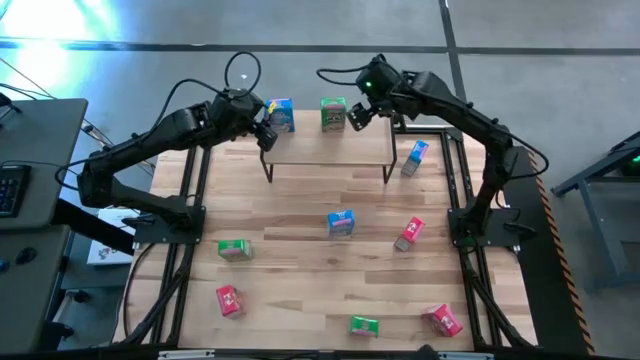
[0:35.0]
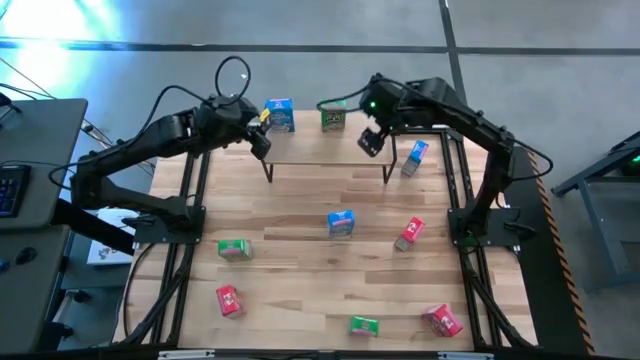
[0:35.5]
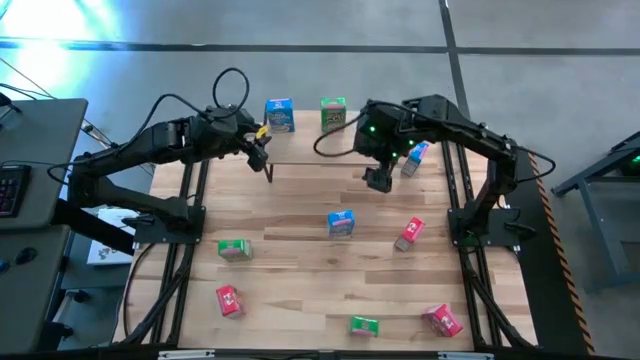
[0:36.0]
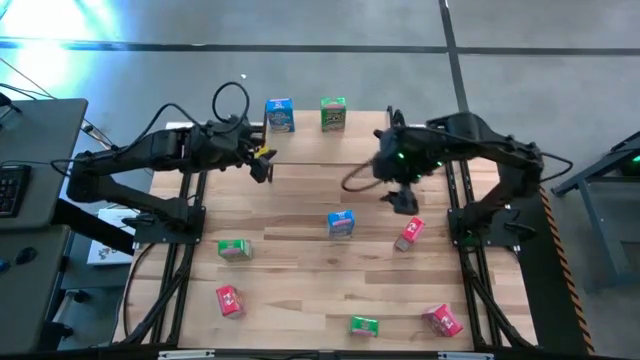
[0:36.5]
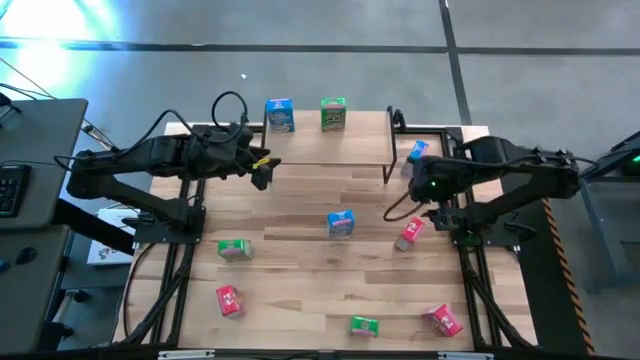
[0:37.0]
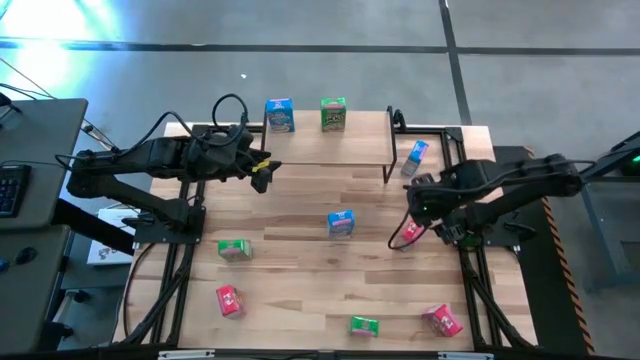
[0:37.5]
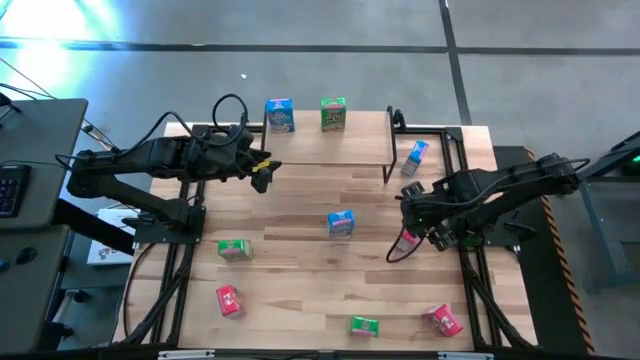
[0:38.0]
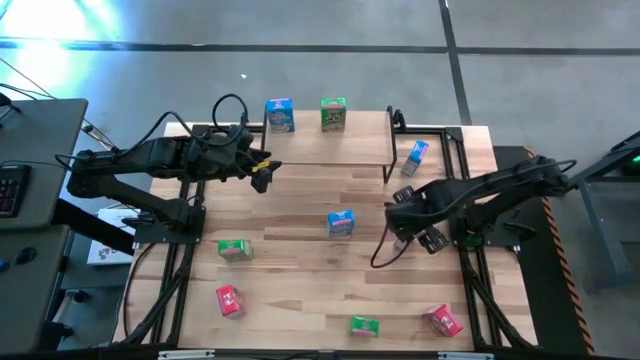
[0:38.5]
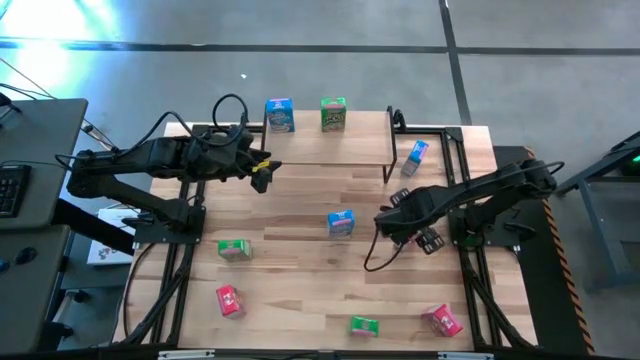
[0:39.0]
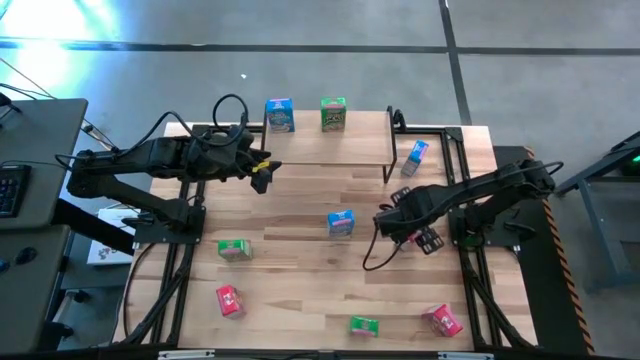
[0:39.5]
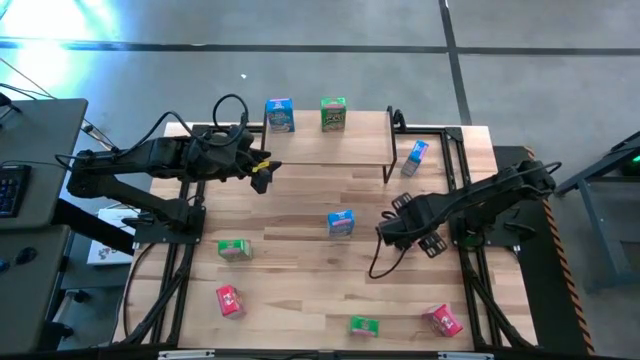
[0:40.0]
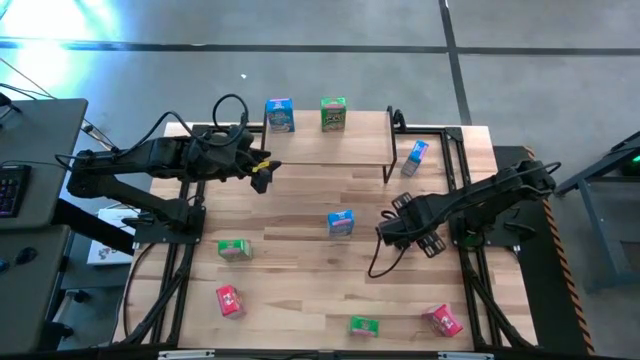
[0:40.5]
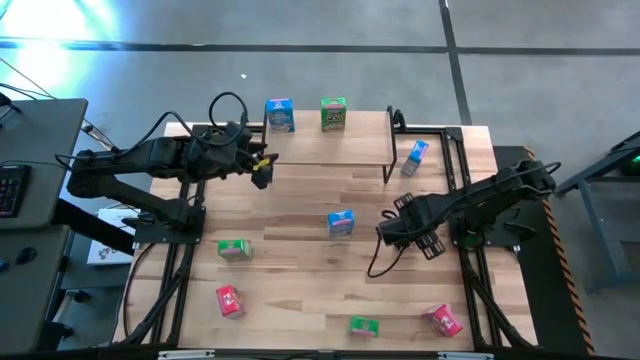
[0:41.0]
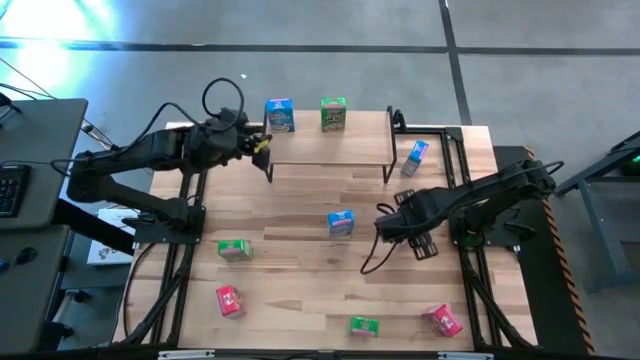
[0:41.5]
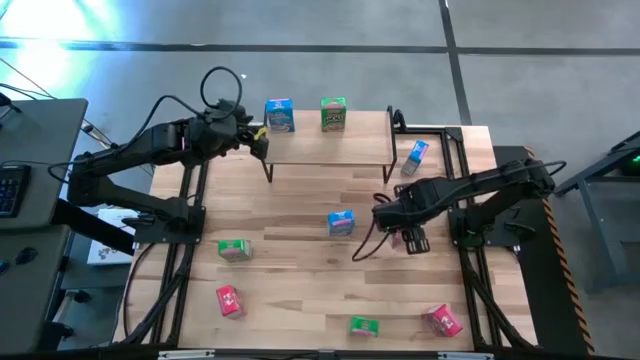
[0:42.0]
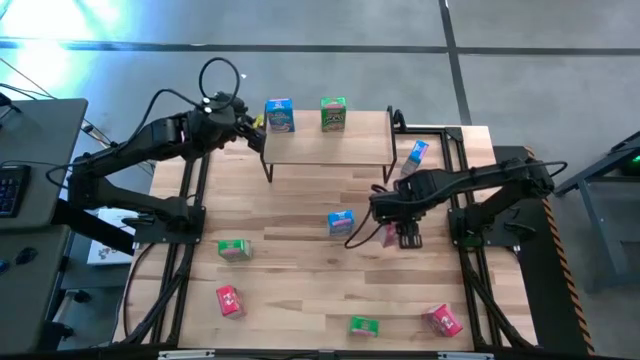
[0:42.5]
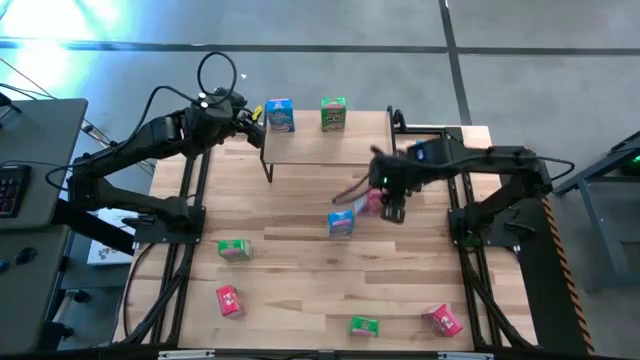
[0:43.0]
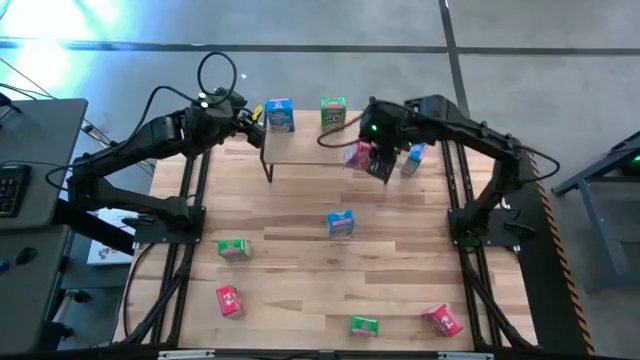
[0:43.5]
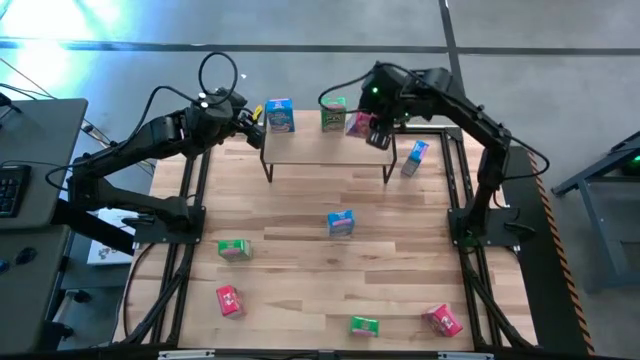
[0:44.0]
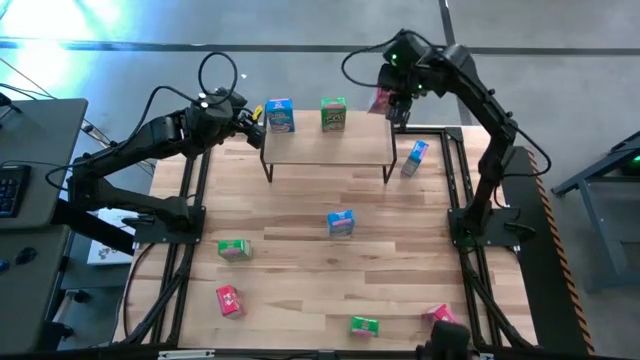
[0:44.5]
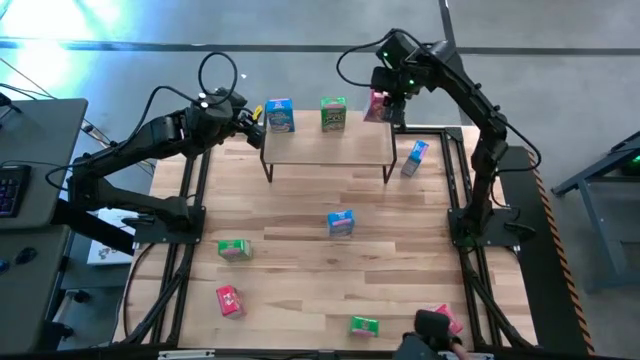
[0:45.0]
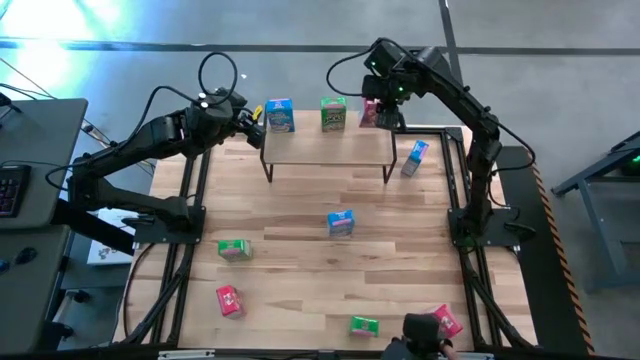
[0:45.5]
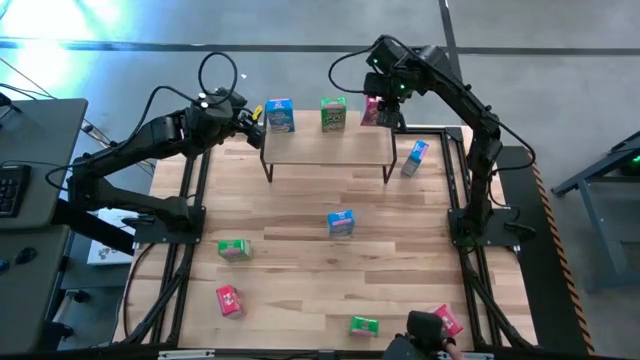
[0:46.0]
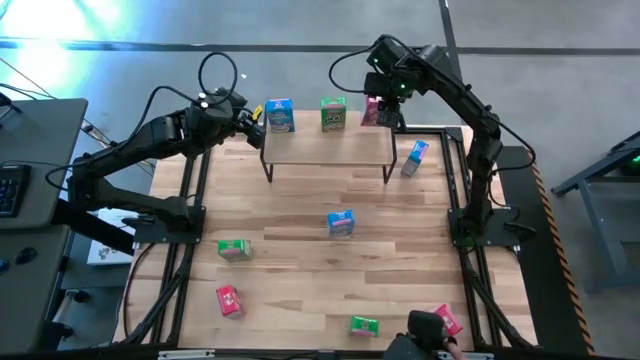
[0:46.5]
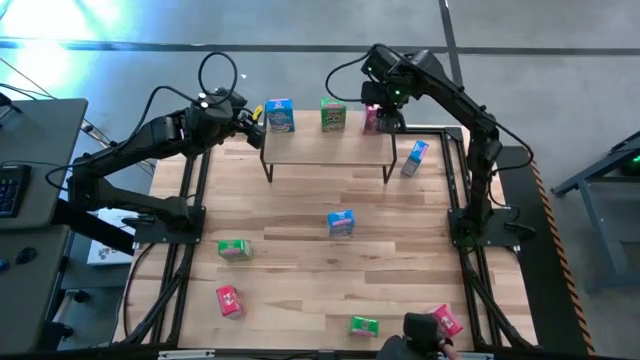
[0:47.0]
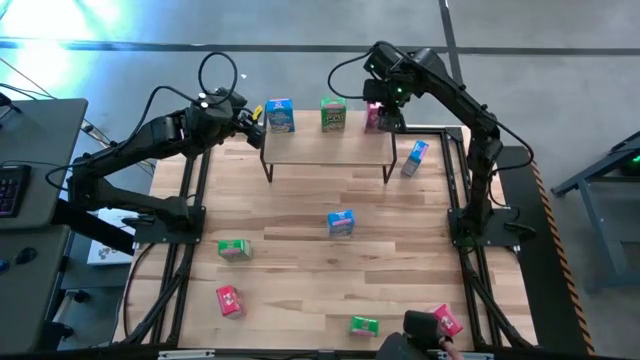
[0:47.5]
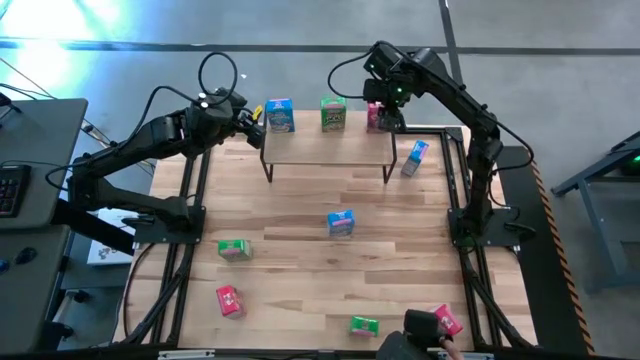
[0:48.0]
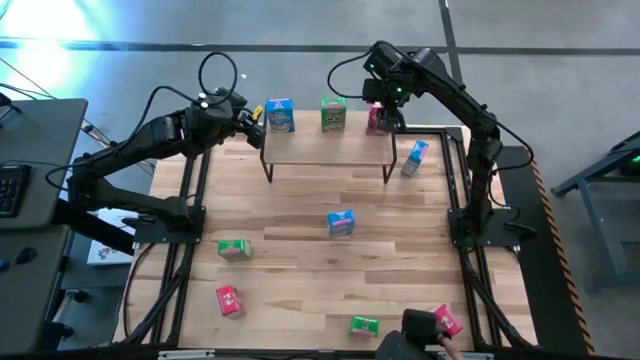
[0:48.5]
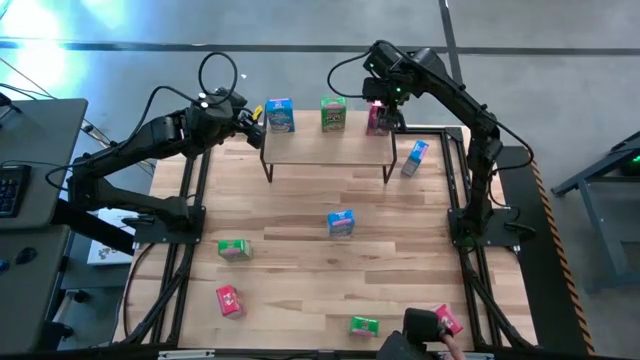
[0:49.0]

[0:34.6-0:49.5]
Task: Stack cereal on shelf
Put the top red cereal box on the shelf

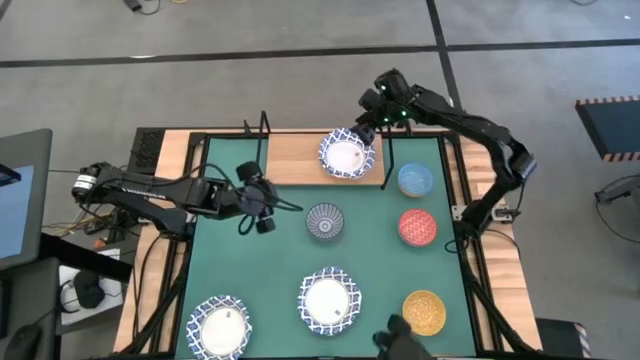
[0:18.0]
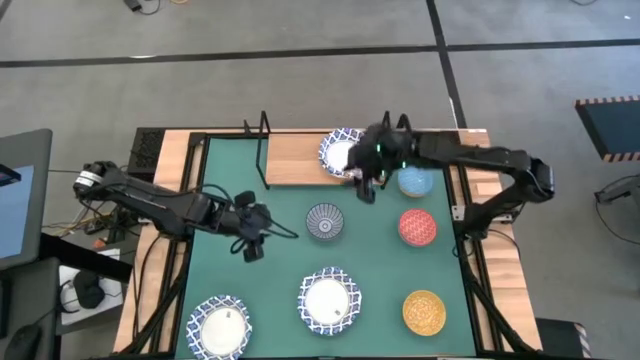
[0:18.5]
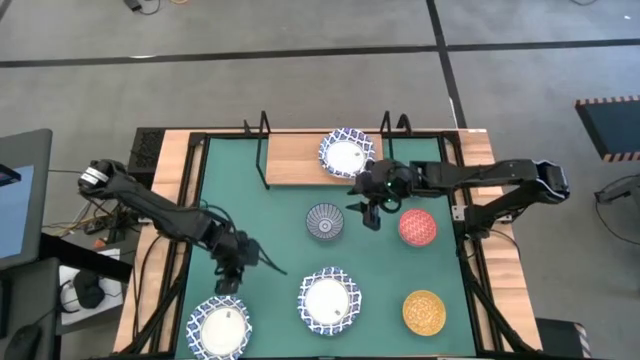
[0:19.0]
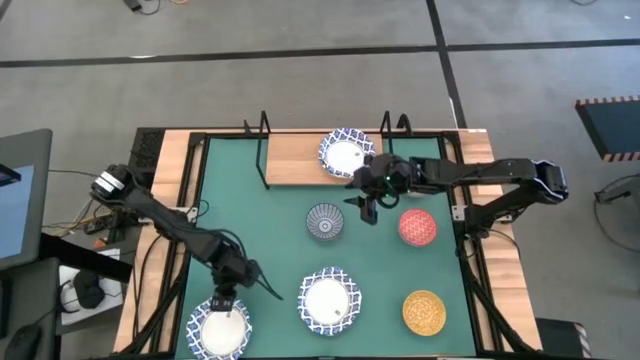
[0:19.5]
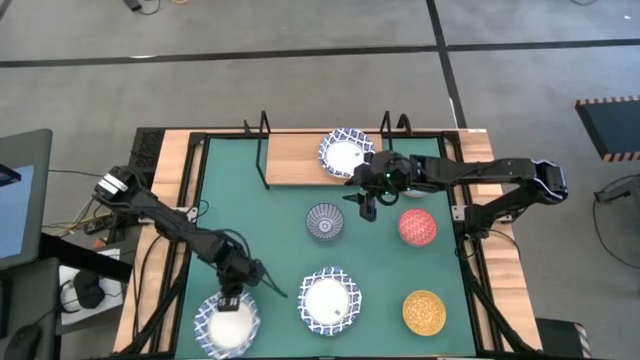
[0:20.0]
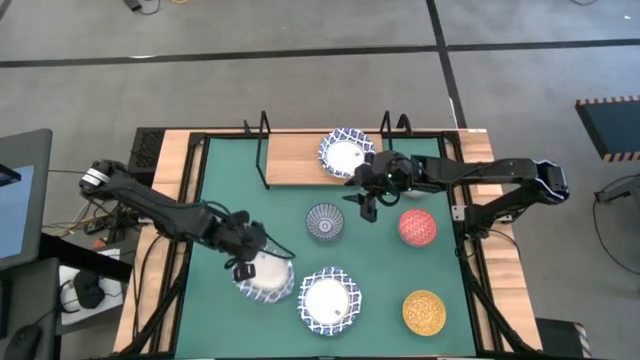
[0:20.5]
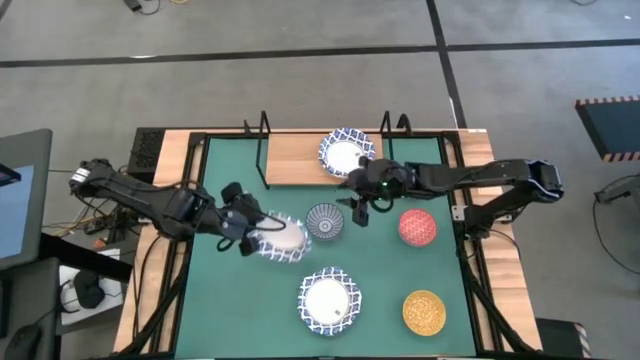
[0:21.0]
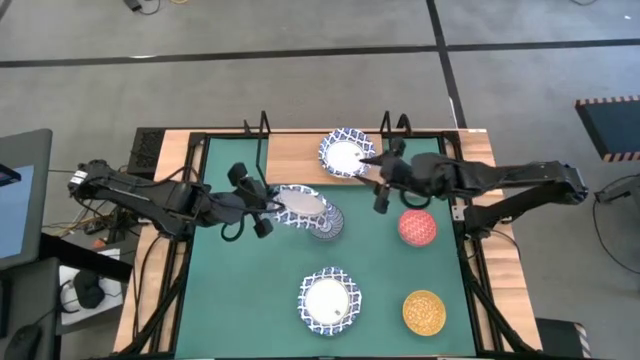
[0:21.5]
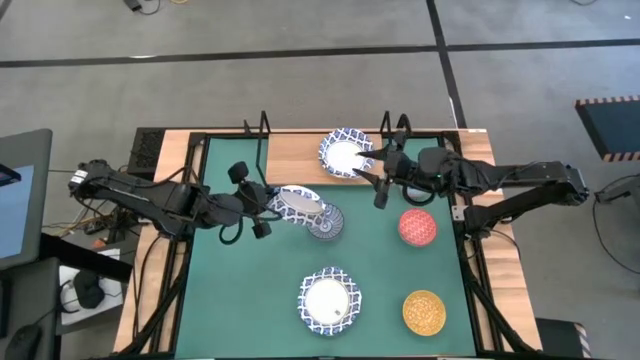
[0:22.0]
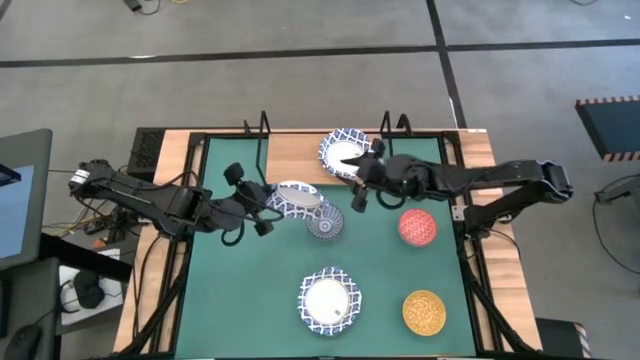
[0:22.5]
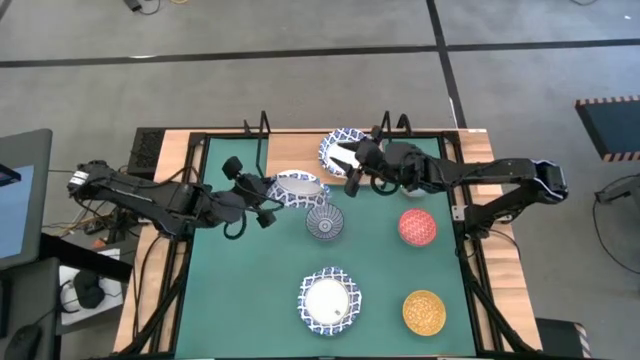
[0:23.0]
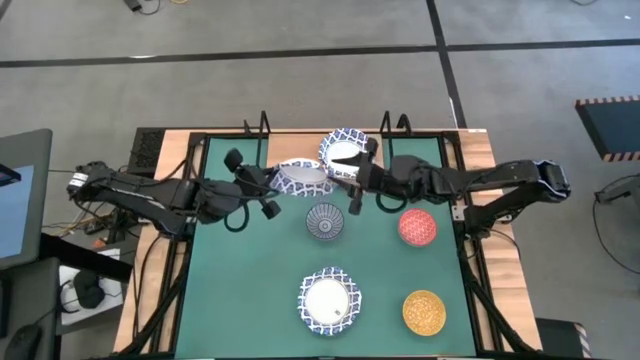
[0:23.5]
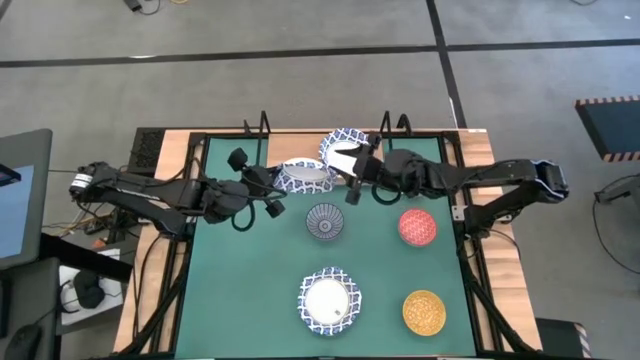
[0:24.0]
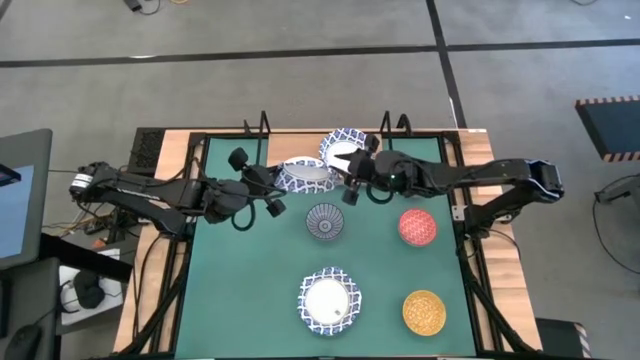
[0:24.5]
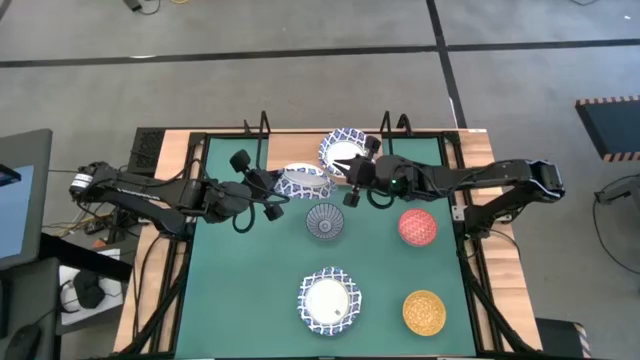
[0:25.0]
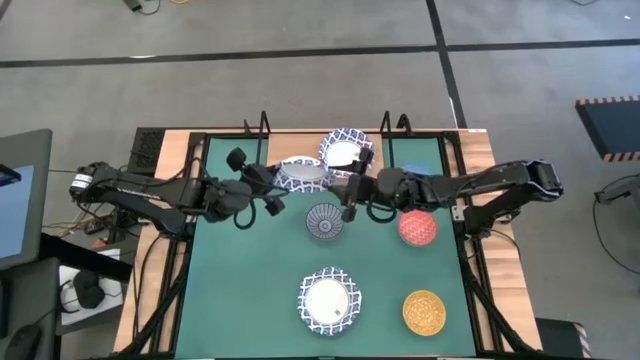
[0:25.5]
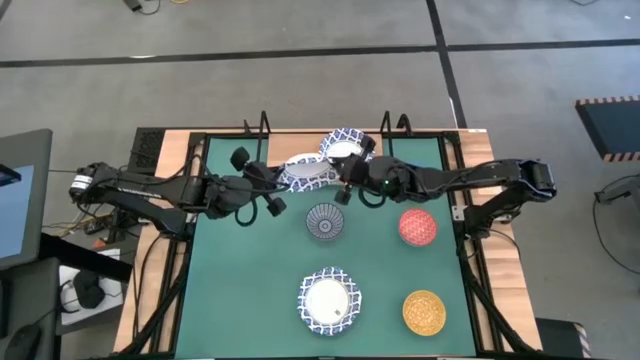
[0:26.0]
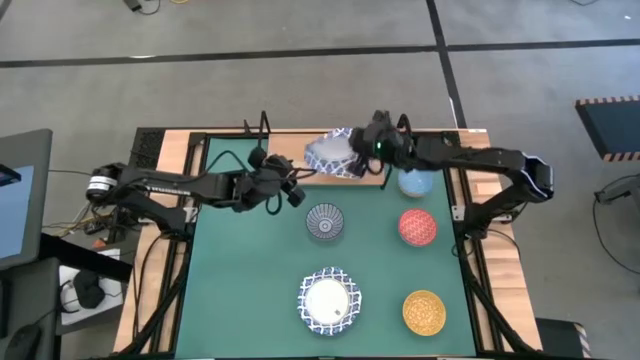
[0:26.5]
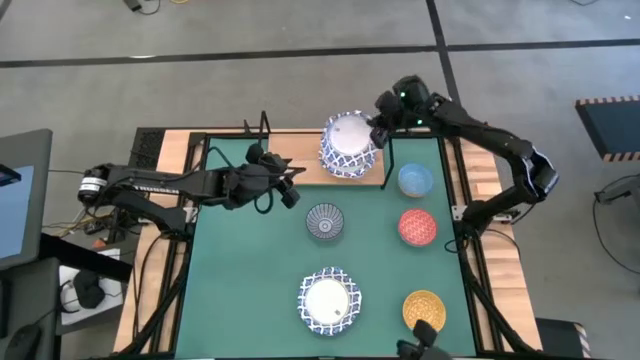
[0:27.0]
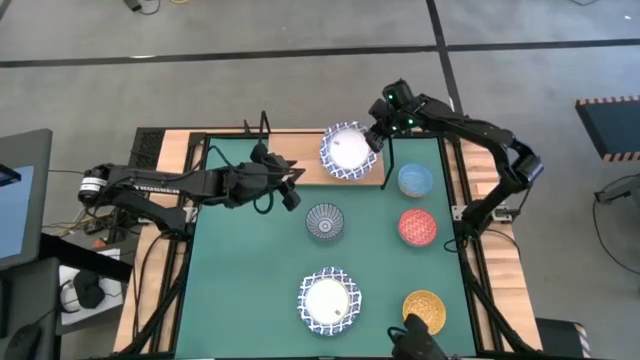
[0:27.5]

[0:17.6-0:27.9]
Task: Place and stack bowls onto a shelf
Stack the white bowl on top of the other white bowls on the shelf
